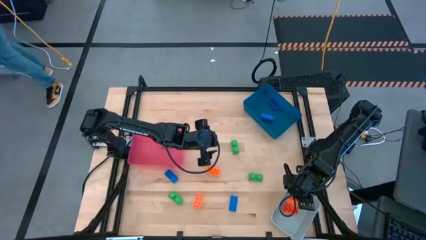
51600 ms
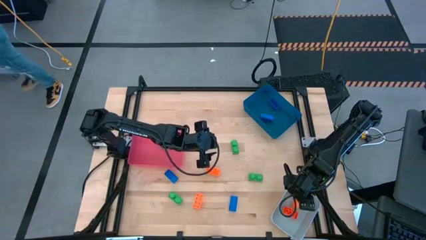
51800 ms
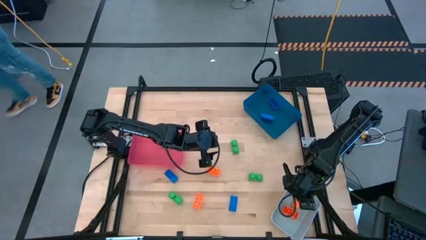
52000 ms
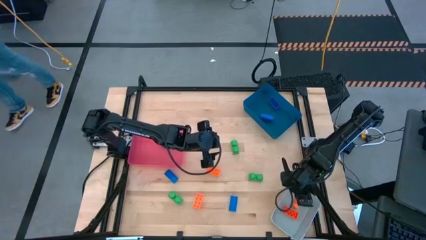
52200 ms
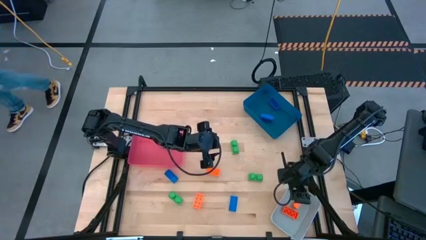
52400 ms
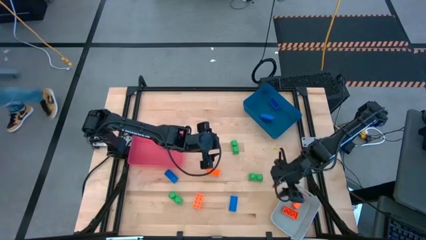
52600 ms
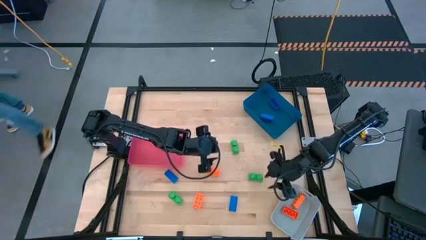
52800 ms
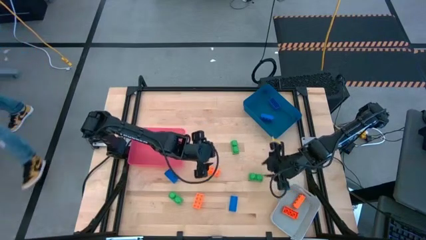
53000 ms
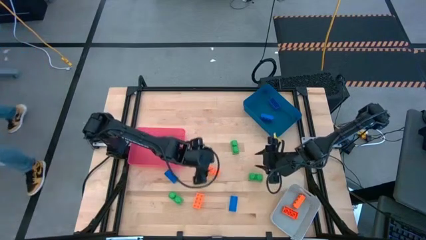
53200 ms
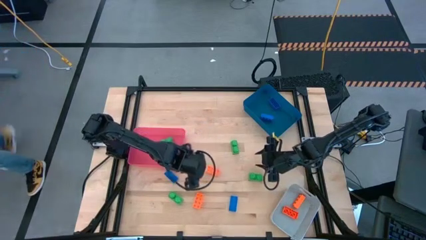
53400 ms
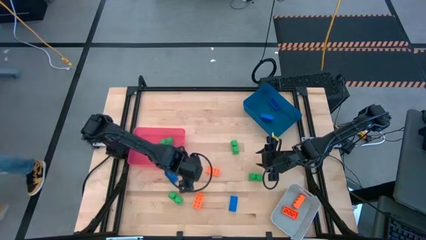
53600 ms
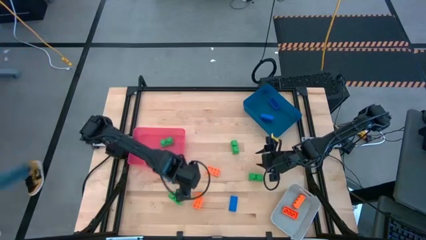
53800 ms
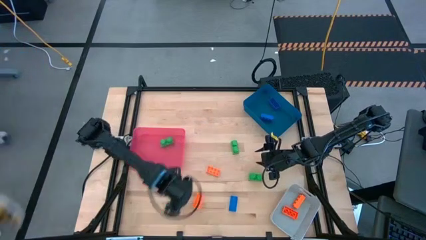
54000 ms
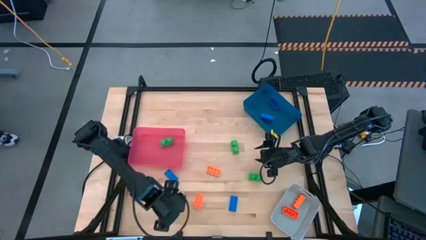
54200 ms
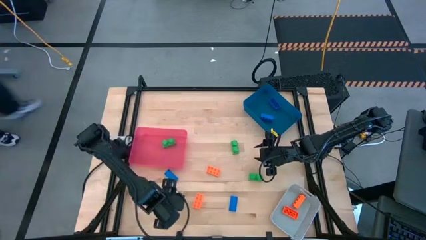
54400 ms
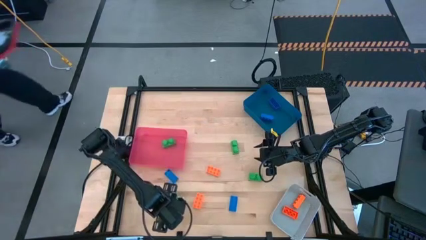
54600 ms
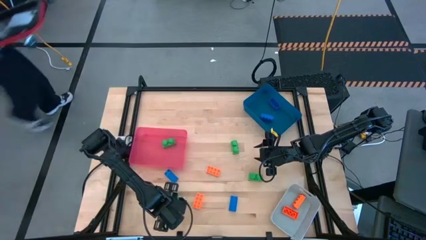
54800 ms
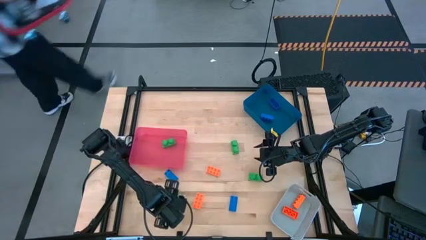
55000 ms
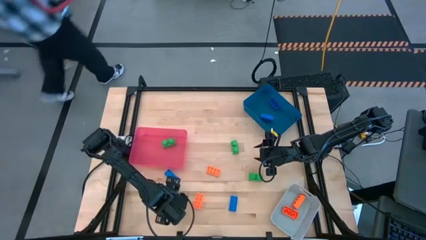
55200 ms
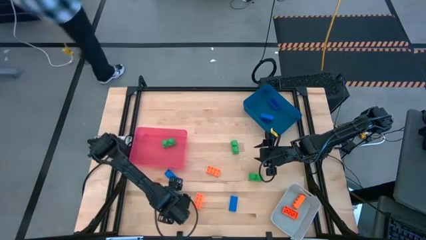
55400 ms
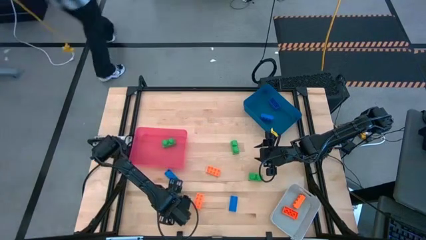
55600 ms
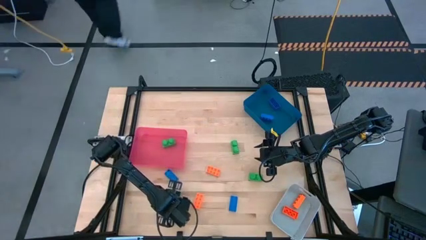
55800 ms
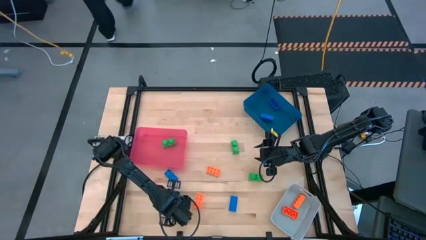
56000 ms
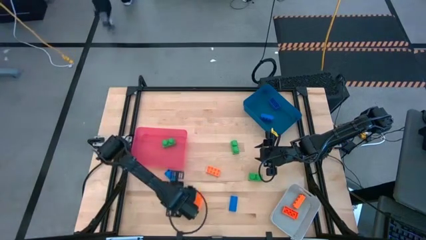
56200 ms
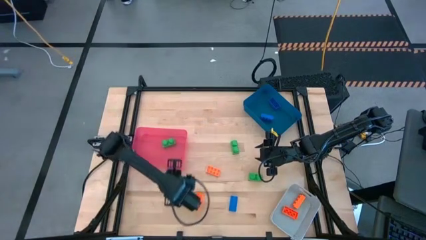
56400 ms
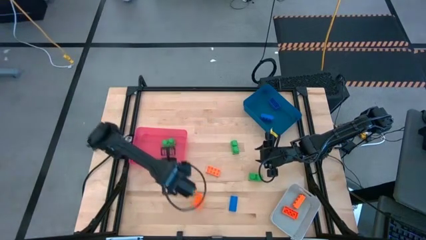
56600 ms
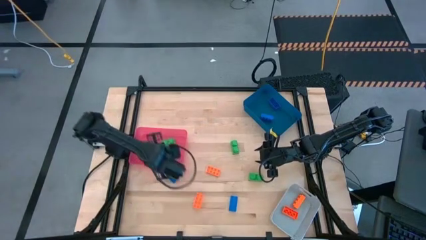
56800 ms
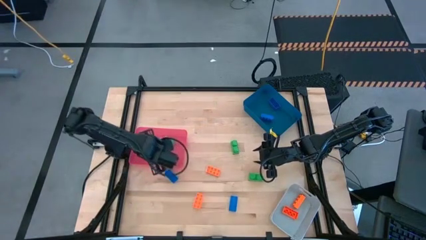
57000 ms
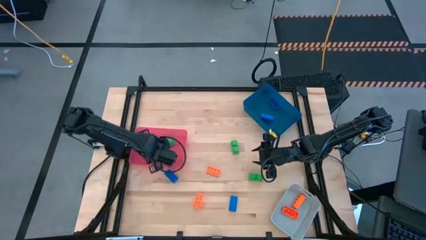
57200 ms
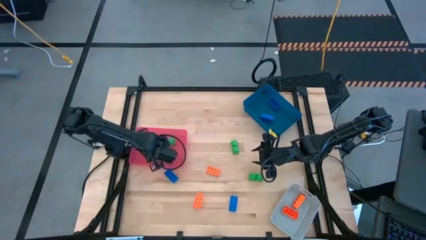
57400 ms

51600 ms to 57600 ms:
Task: Sort & place blocks by color
Put the green game piece into the red bin

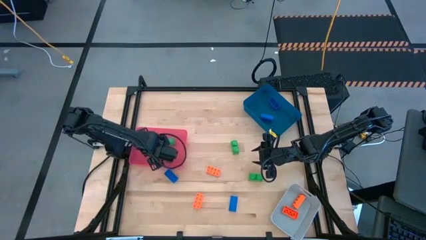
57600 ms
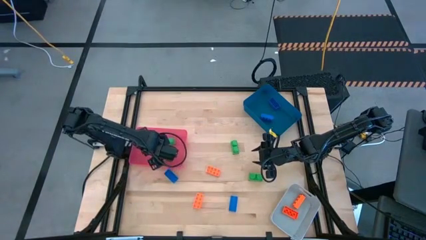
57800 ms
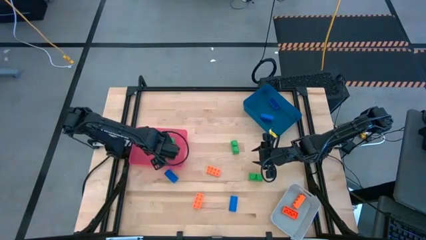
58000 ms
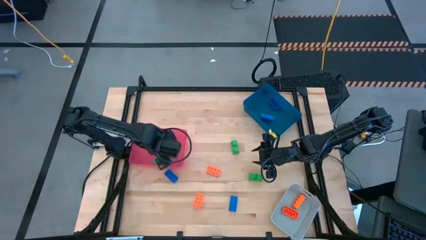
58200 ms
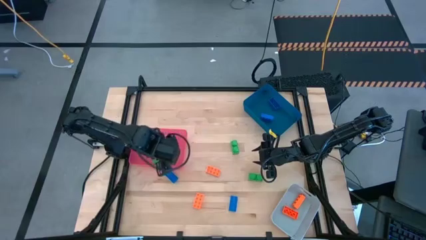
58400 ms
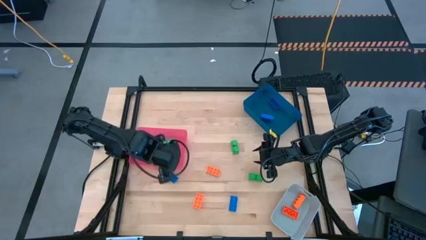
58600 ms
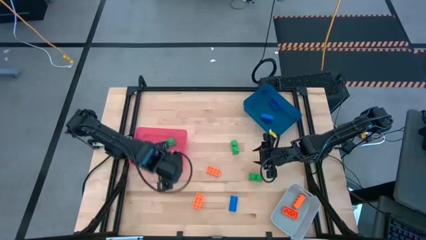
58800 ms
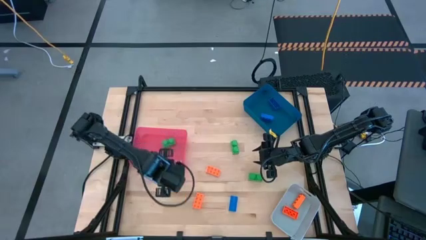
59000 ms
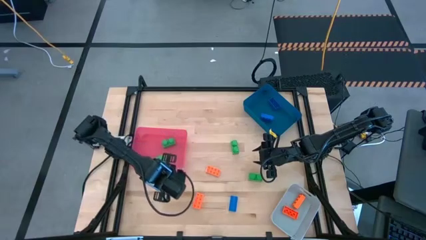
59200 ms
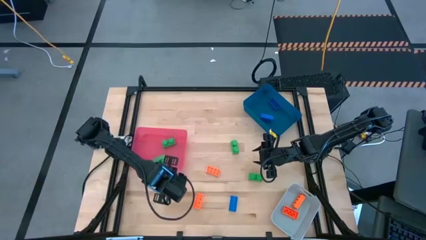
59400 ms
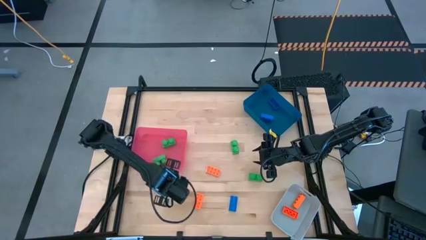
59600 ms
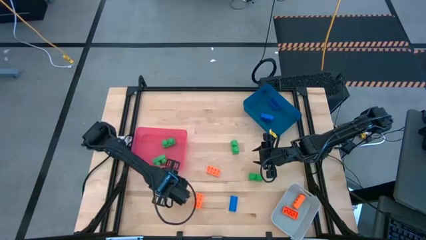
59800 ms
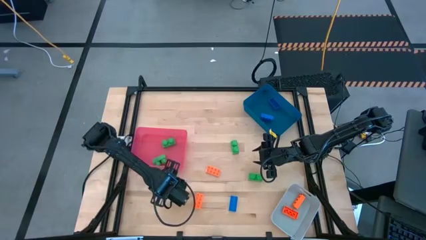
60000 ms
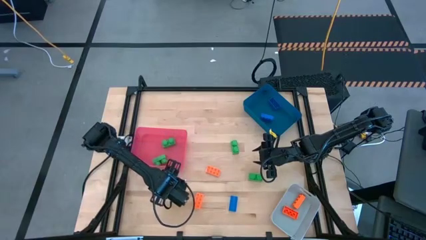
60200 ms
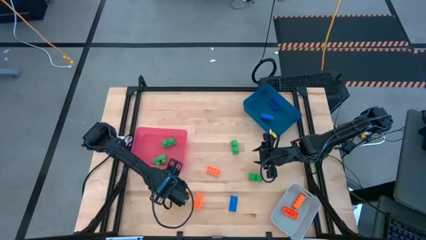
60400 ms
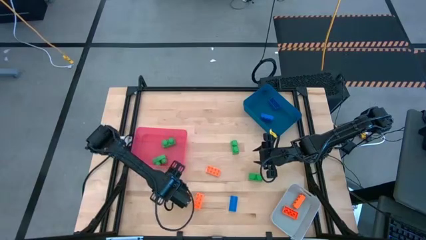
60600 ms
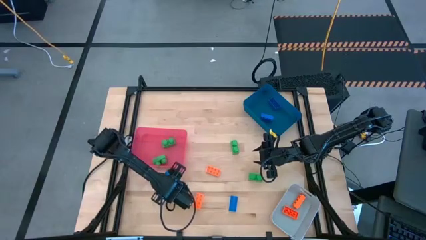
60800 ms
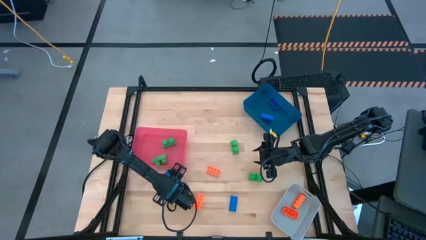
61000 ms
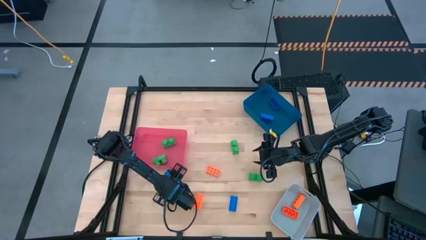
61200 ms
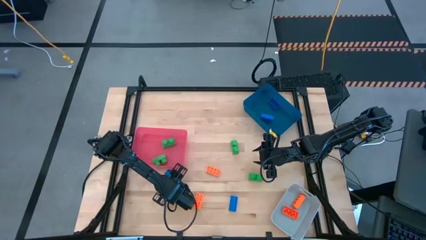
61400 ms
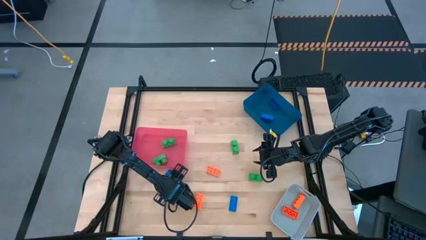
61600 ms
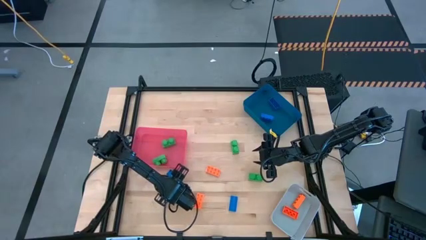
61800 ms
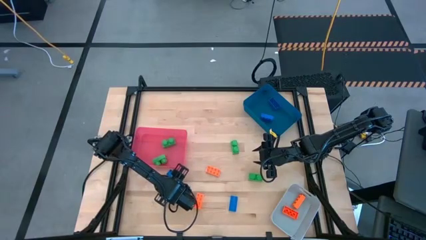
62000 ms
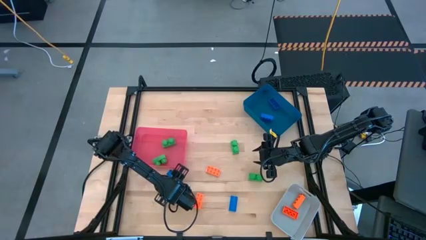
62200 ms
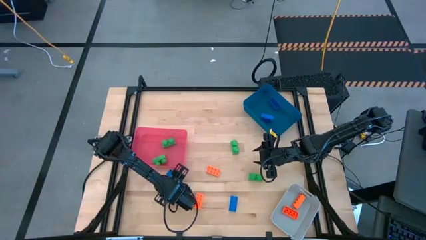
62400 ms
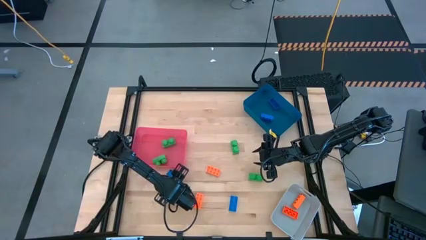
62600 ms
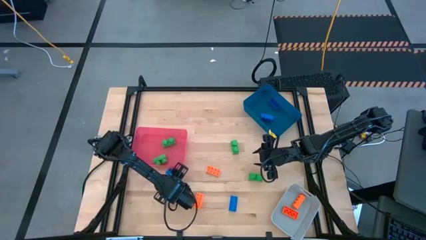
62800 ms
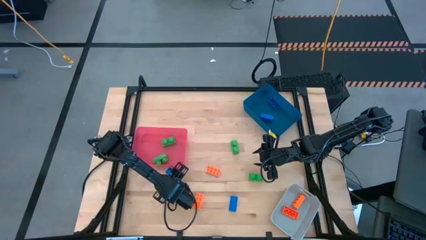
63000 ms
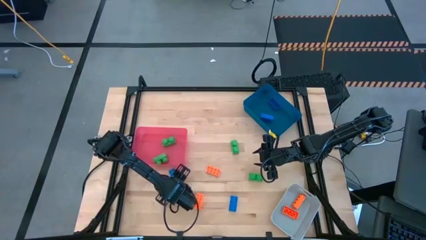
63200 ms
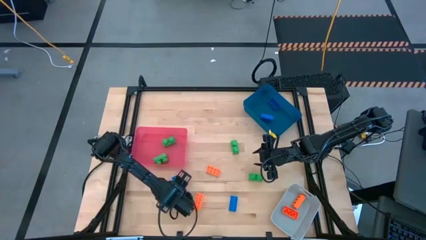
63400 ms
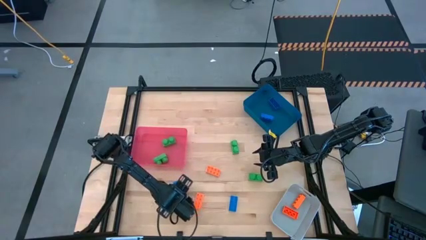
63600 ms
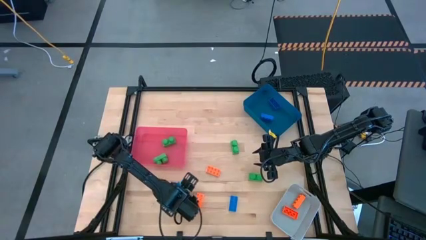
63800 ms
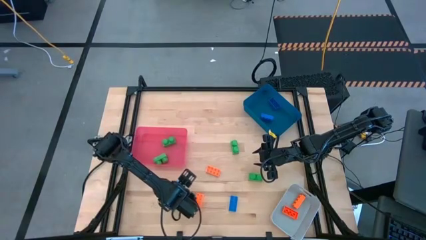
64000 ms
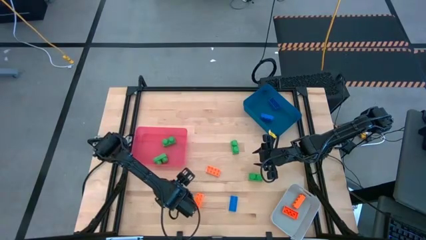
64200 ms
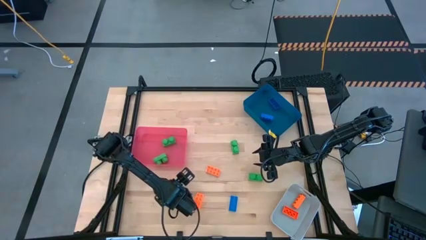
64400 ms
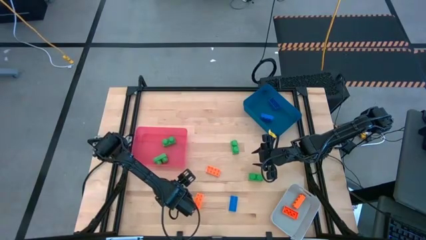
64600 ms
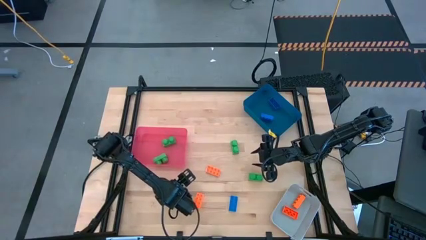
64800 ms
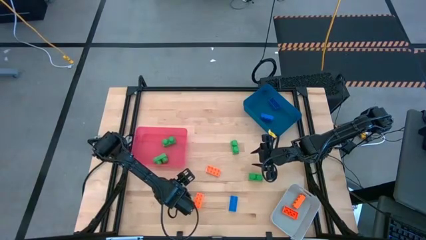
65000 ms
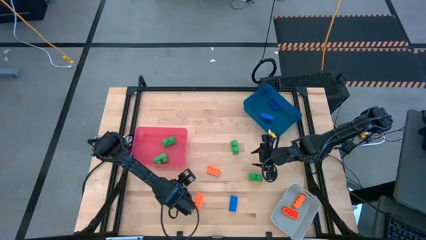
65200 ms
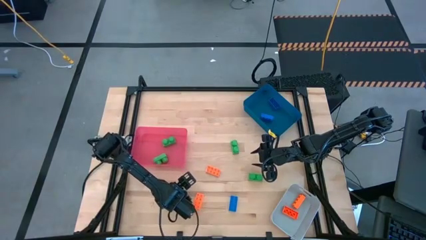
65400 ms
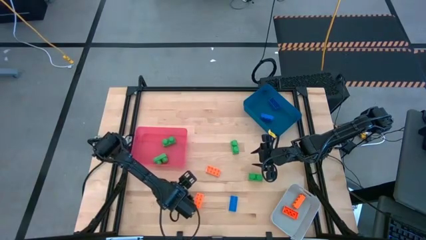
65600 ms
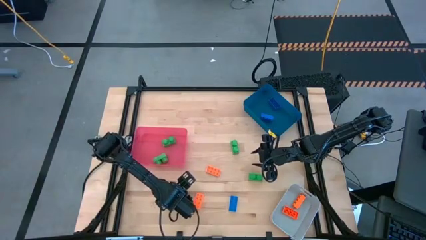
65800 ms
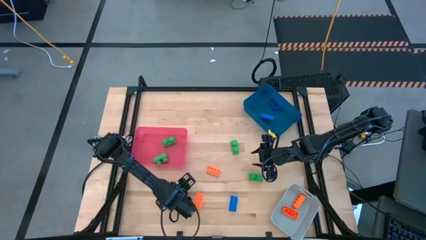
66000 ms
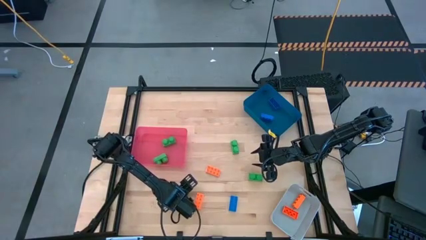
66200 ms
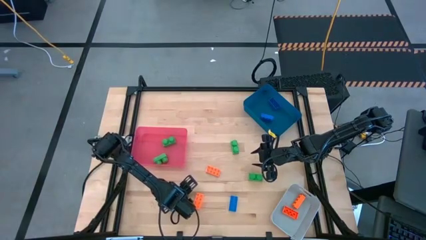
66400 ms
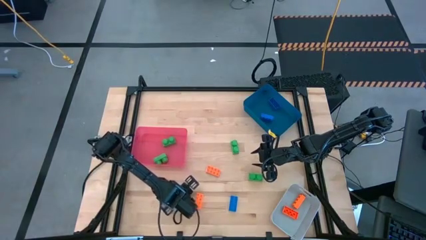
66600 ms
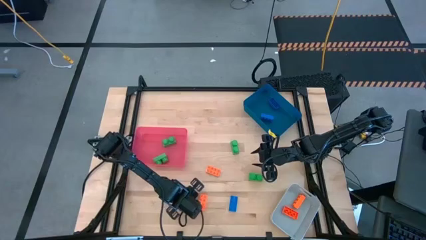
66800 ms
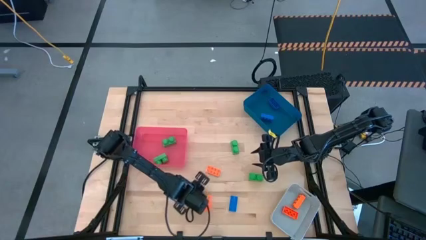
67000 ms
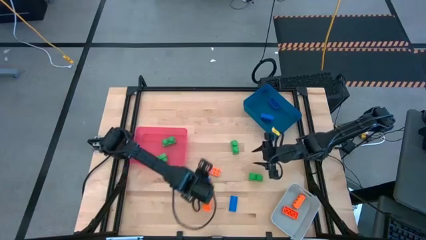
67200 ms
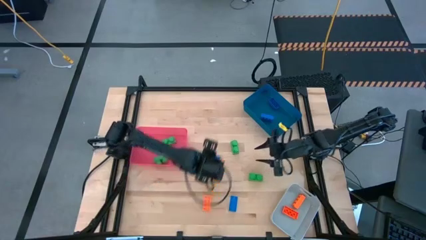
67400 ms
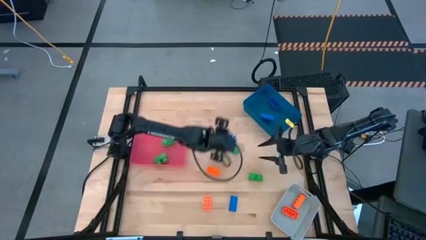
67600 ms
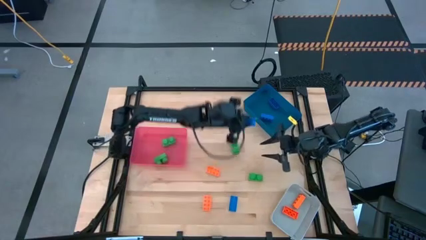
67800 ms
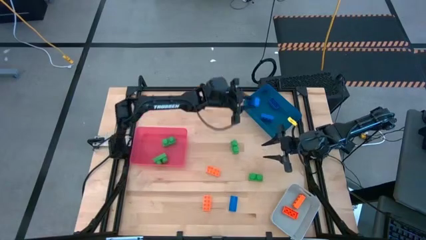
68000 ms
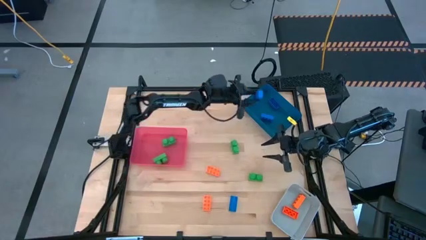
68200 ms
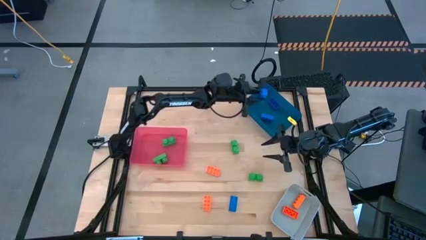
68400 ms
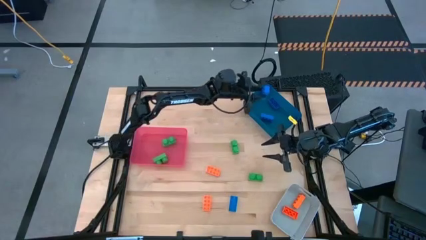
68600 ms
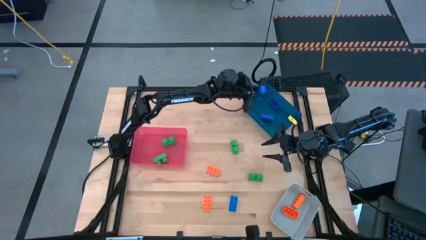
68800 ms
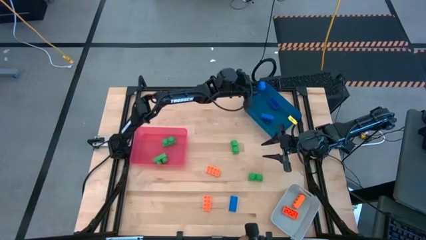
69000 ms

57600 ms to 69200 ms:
Put the blue game piece into the blue bin
